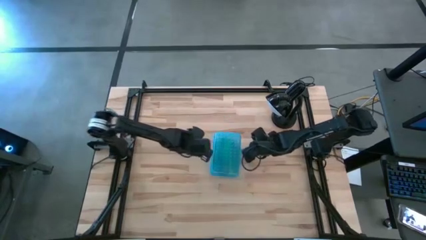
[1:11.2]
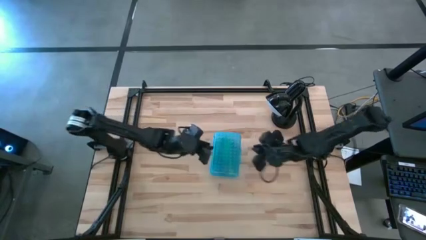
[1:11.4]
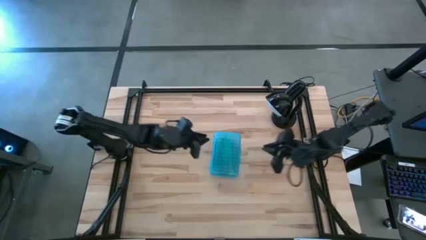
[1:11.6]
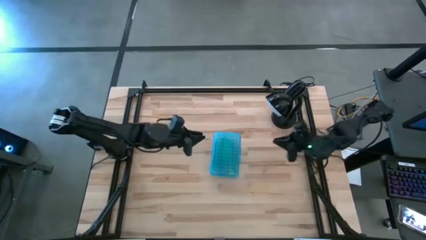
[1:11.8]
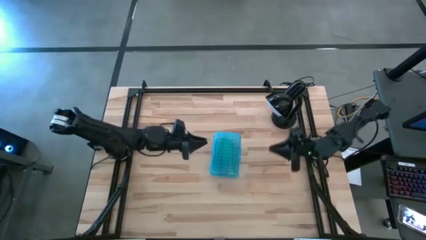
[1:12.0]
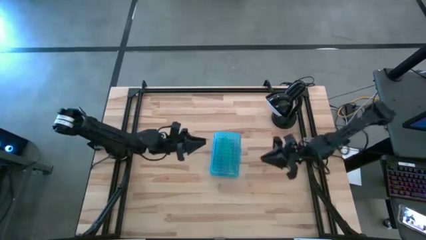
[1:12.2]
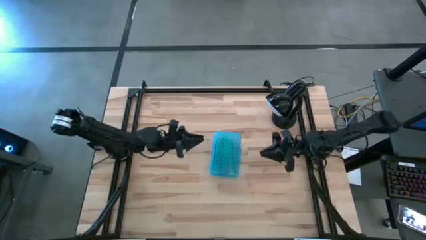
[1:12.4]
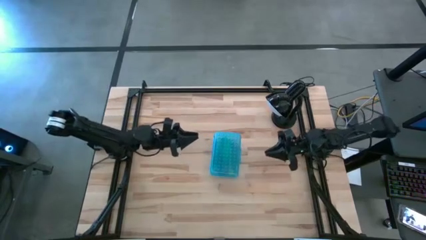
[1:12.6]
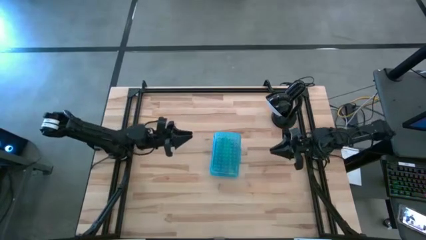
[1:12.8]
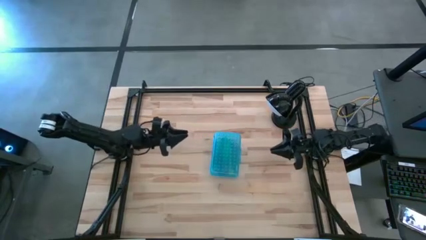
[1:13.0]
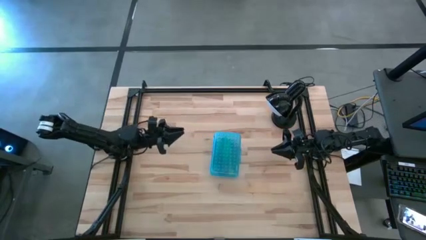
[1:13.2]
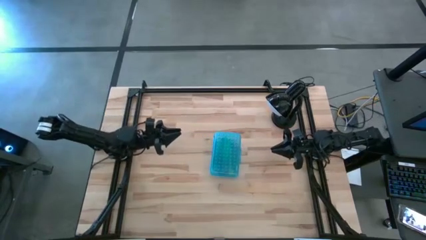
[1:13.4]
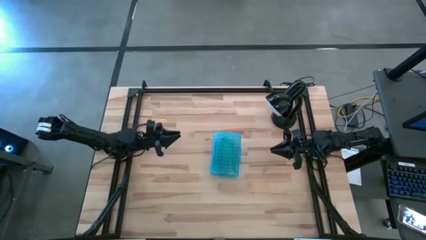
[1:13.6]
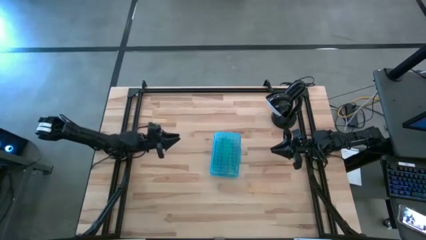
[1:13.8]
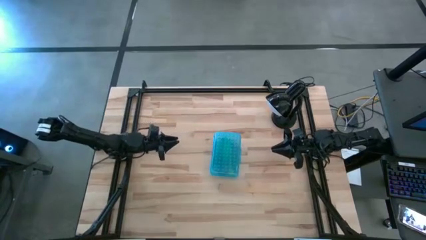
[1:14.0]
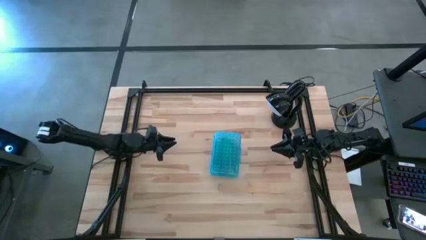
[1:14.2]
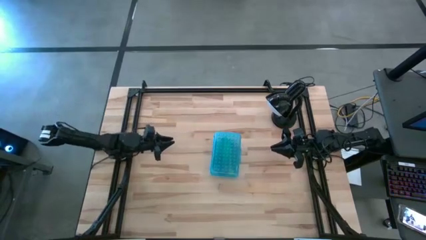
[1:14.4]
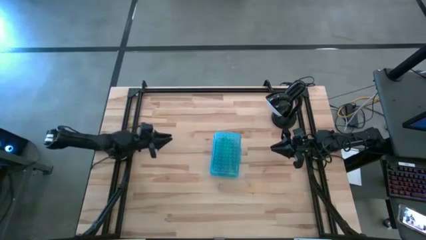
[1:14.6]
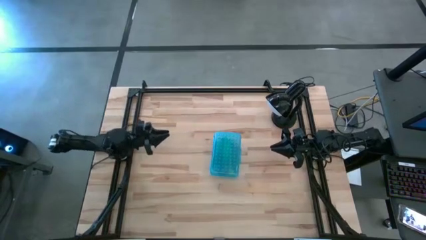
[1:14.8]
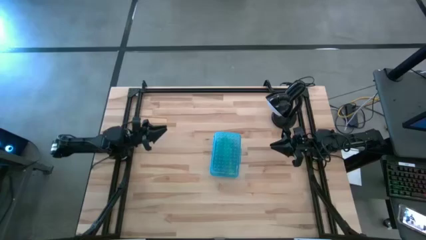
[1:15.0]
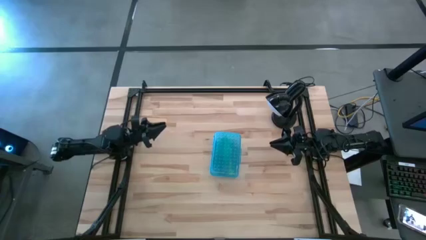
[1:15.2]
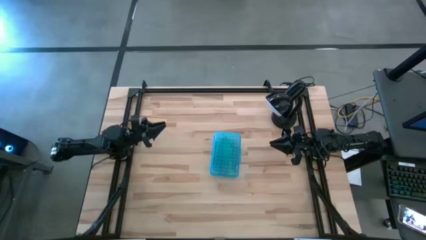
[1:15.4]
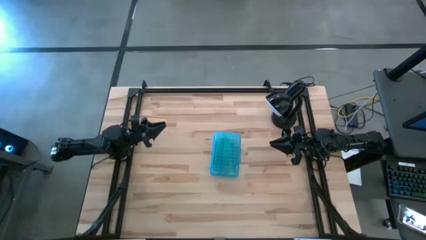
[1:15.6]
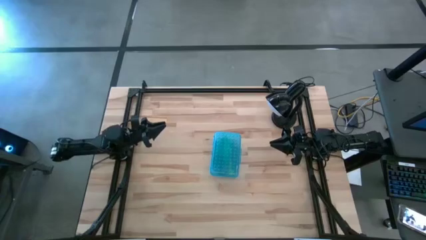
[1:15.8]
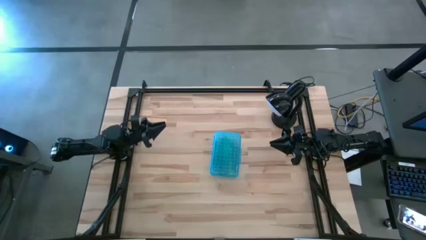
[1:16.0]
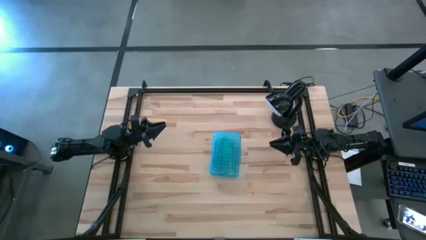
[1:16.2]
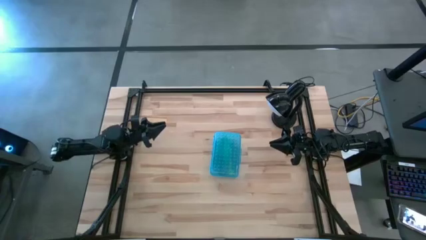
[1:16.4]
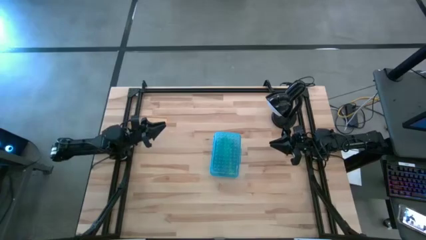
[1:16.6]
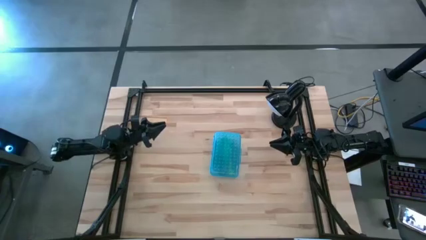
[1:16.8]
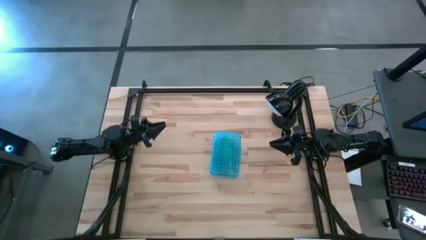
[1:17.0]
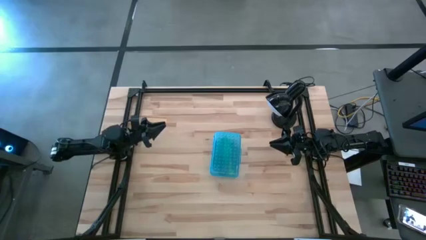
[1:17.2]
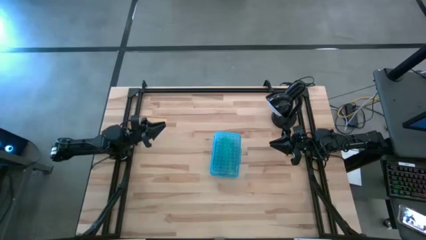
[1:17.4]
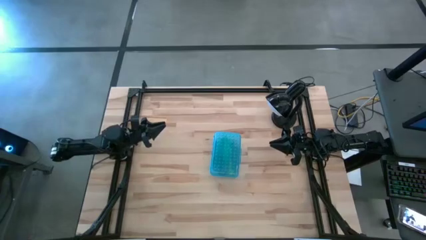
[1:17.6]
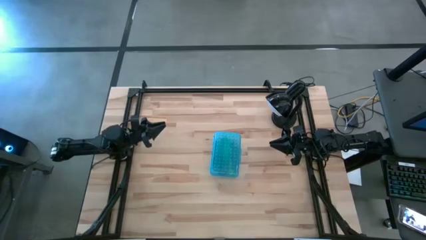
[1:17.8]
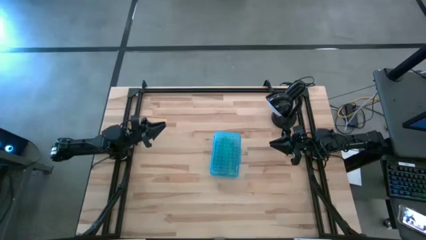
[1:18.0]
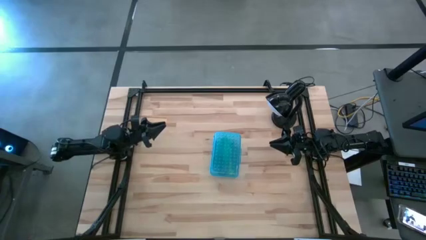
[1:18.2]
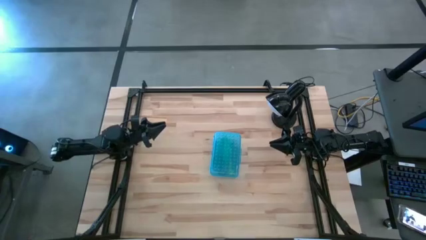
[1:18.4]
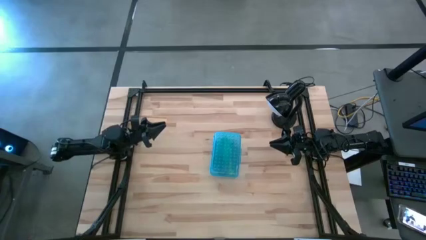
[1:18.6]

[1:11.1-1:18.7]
Task: Pick & place school supplies into a supply box
Return to Home Position

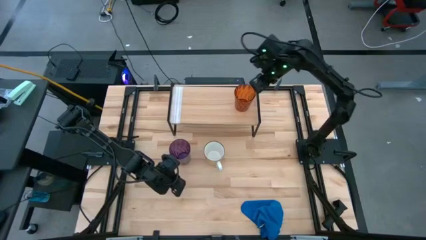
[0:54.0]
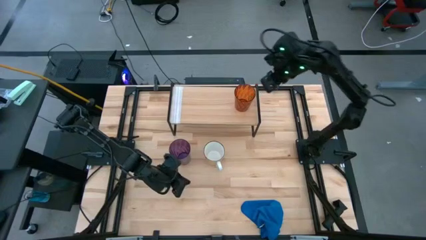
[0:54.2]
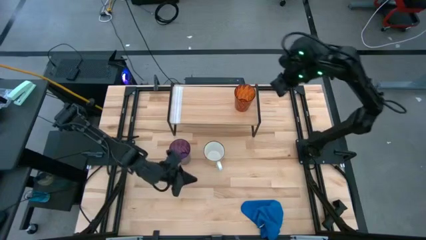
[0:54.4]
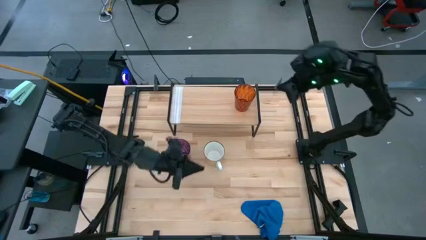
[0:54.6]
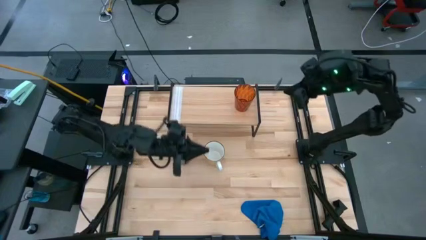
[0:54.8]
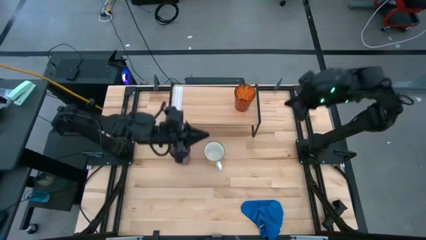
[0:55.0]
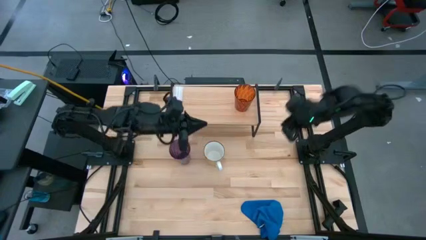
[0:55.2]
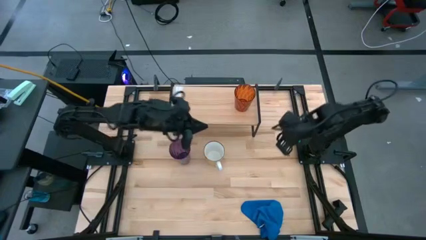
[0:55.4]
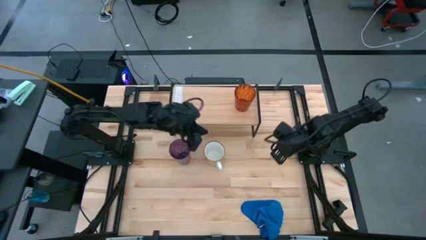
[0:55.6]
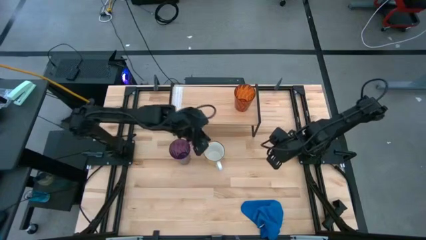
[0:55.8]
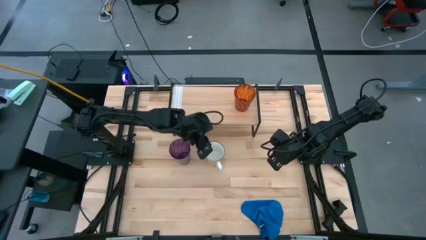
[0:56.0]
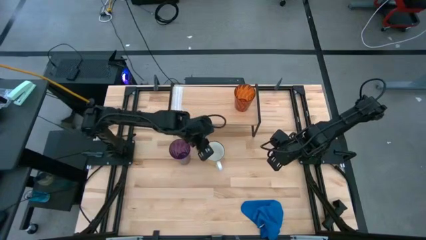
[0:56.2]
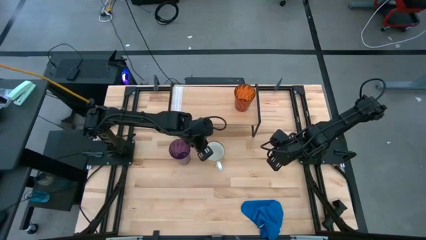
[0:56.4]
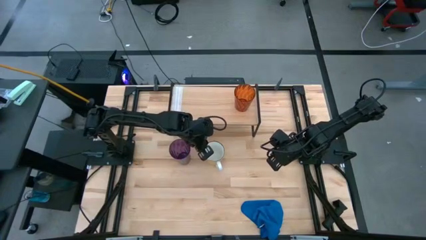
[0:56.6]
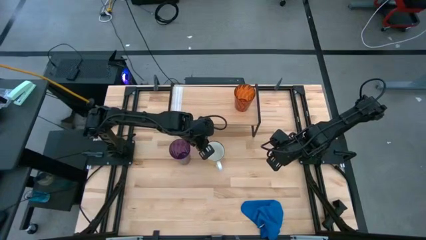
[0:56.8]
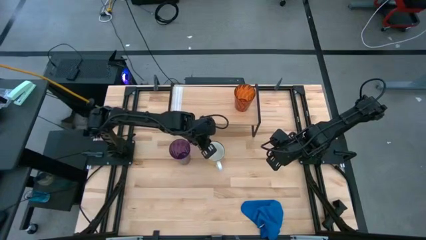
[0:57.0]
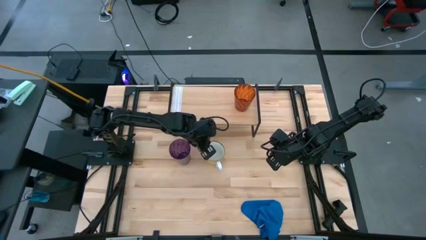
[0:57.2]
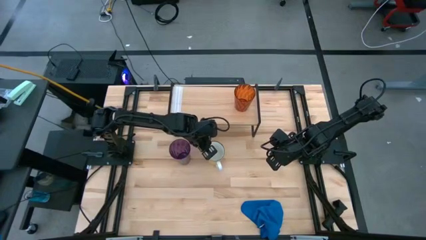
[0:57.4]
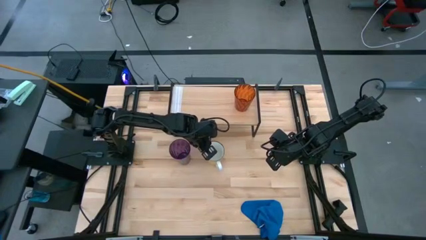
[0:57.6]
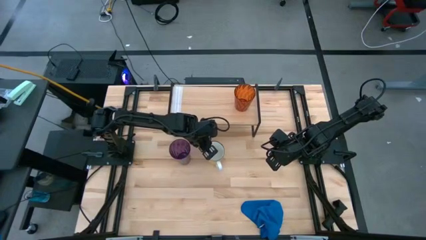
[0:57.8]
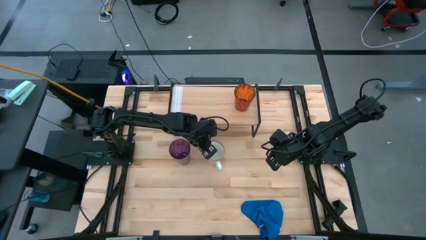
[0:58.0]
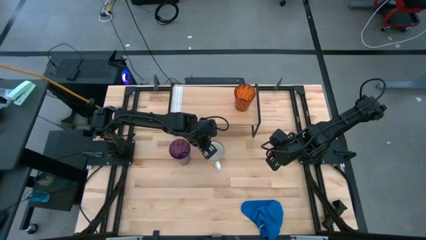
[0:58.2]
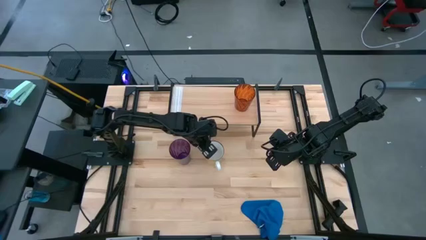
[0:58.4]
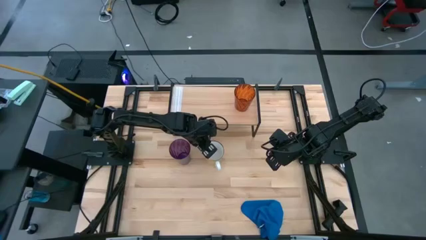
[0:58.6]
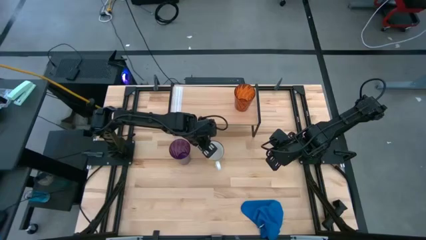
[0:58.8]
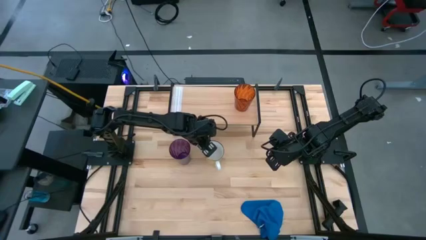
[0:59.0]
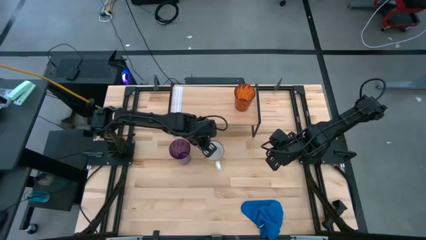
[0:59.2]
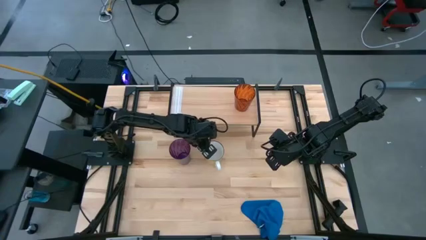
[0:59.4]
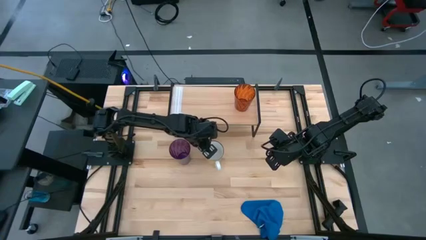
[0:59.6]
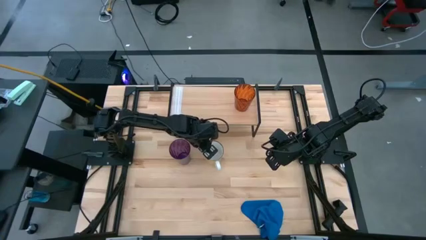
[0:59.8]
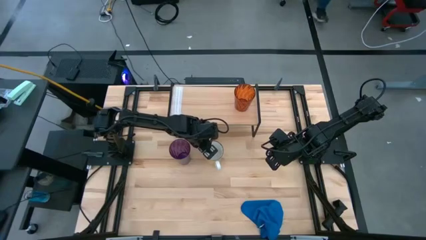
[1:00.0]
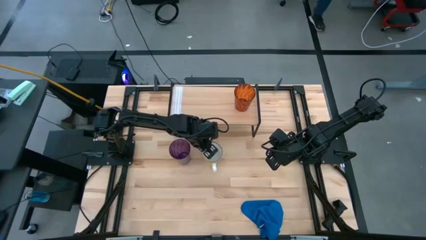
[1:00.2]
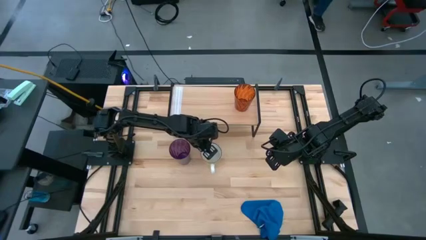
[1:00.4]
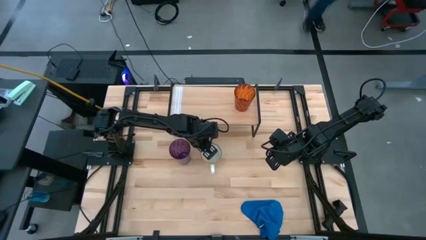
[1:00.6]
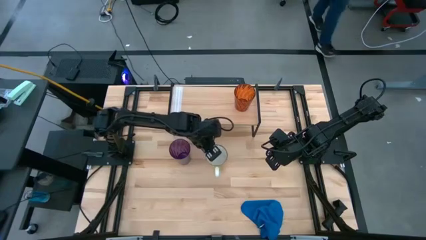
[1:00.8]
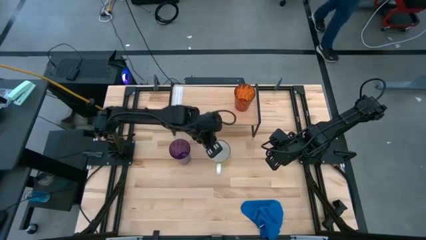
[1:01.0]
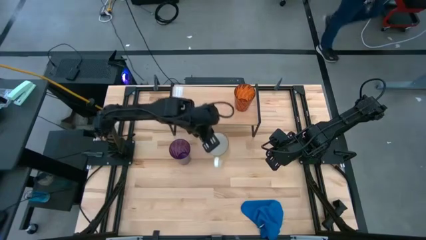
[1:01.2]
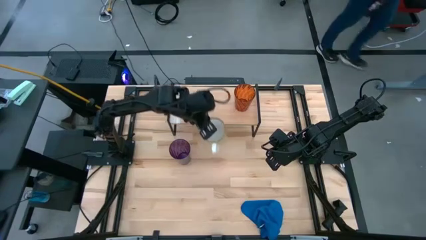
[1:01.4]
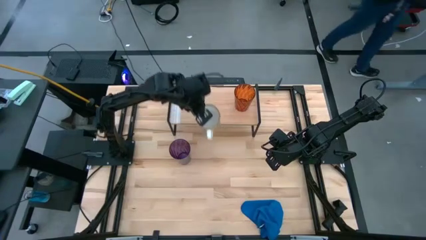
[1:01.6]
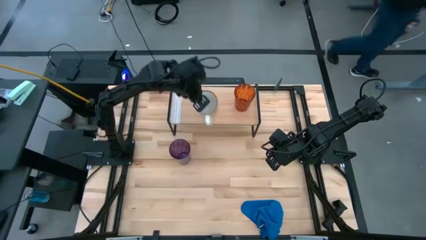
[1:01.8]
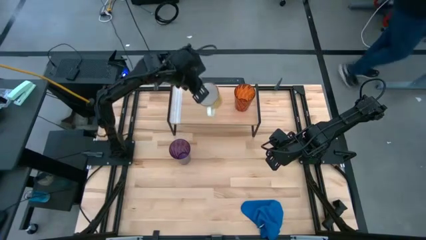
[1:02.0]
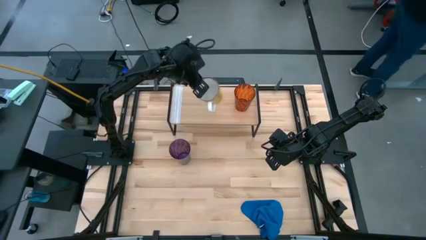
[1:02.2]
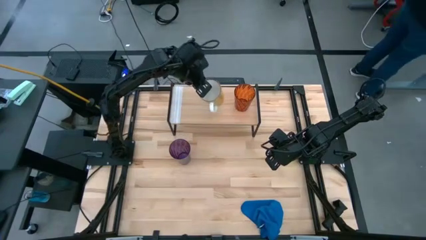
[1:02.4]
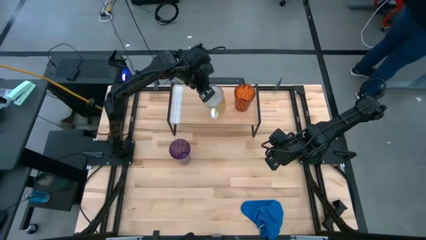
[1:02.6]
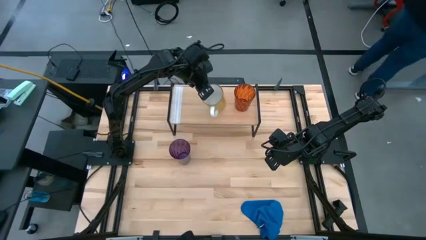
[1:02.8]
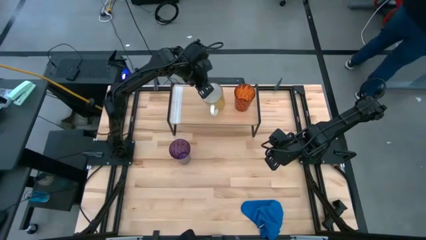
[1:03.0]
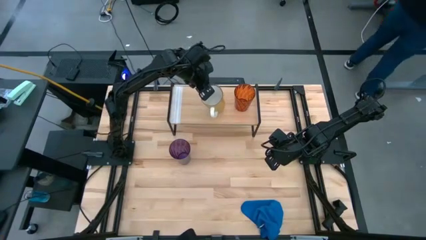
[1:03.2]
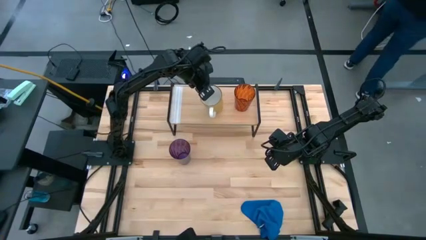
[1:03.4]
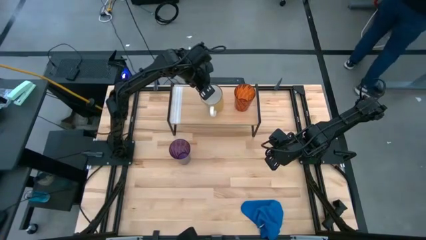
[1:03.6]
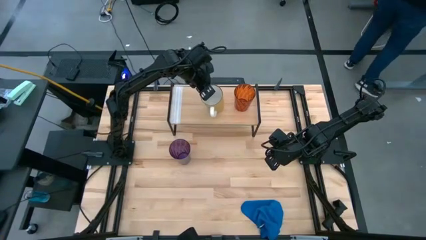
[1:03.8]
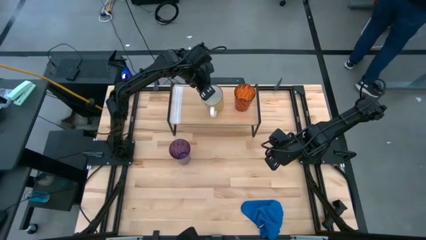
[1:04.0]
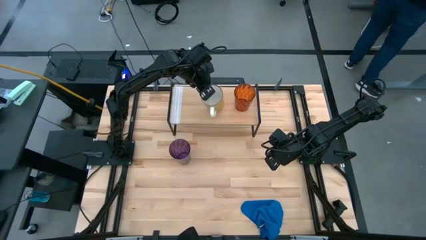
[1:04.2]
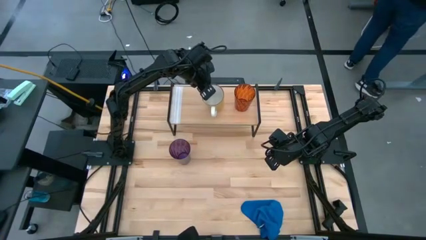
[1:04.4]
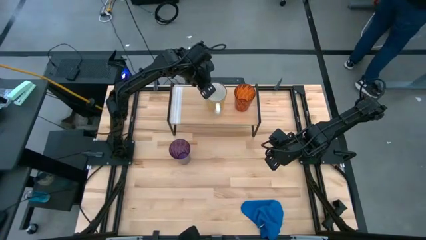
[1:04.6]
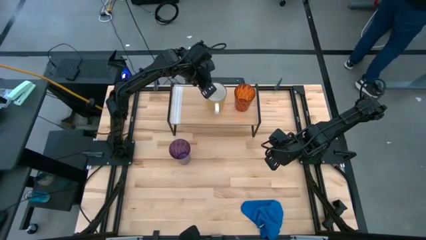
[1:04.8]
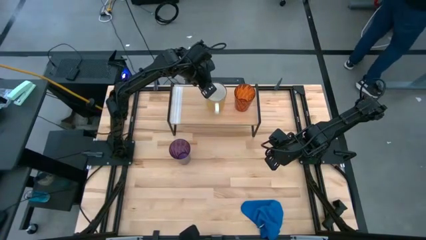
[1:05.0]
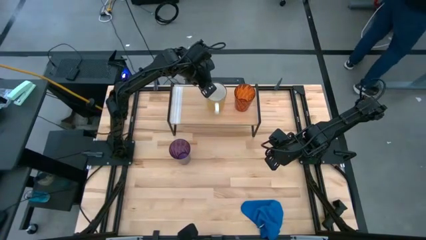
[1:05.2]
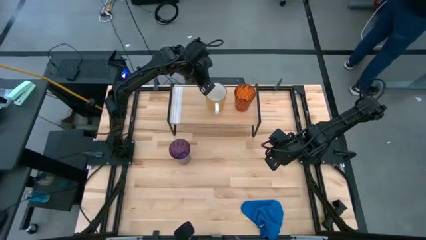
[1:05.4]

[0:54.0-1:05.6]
Task: Stack small to large cups/mugs on shelf
Put the yellow mug on the shelf
